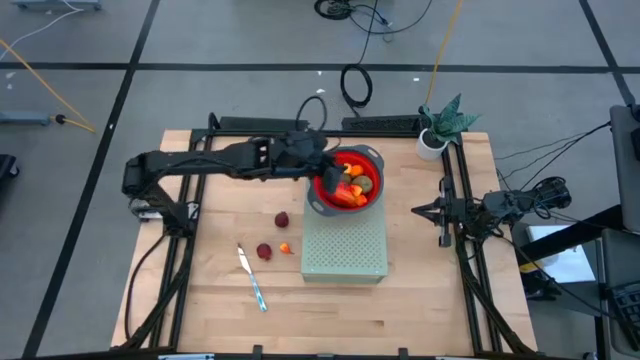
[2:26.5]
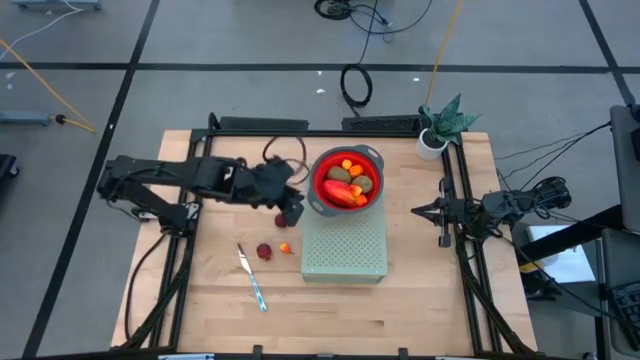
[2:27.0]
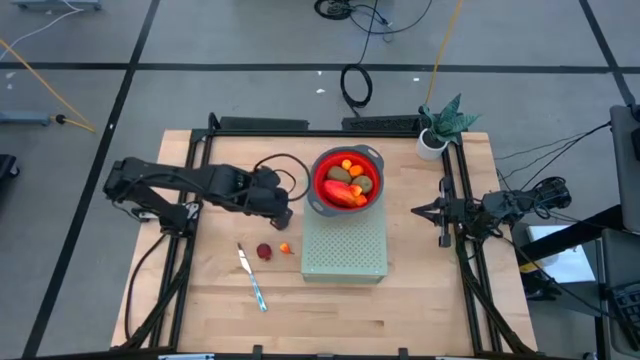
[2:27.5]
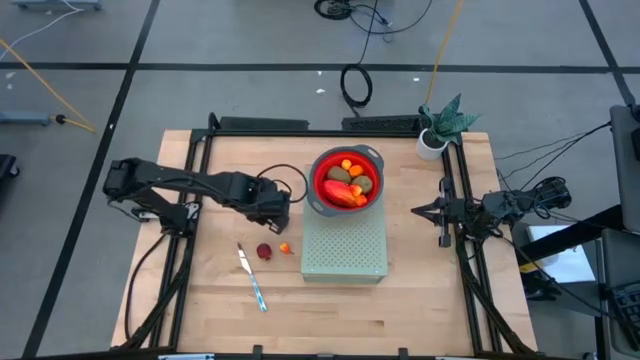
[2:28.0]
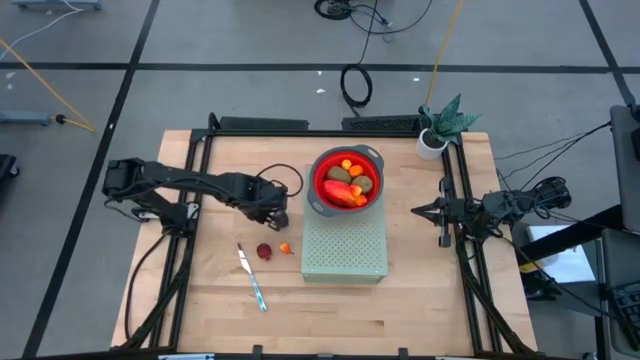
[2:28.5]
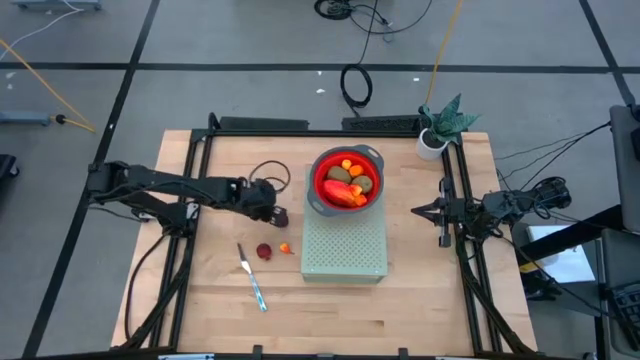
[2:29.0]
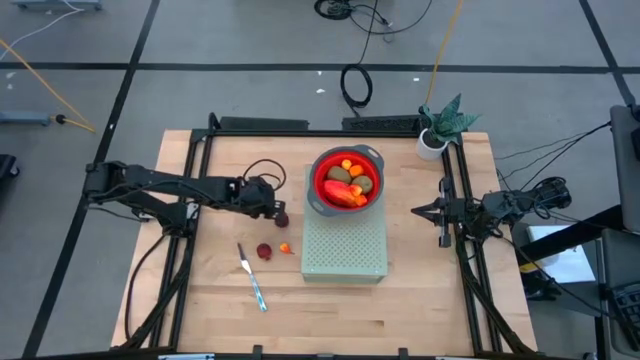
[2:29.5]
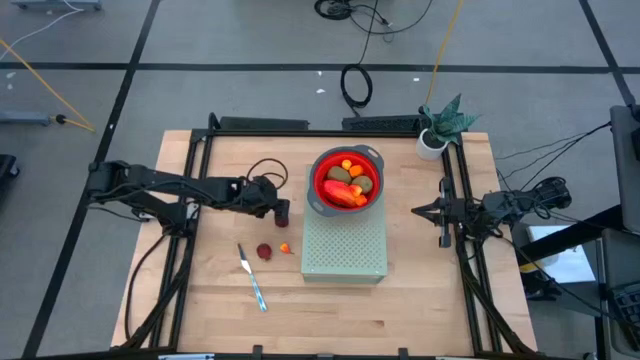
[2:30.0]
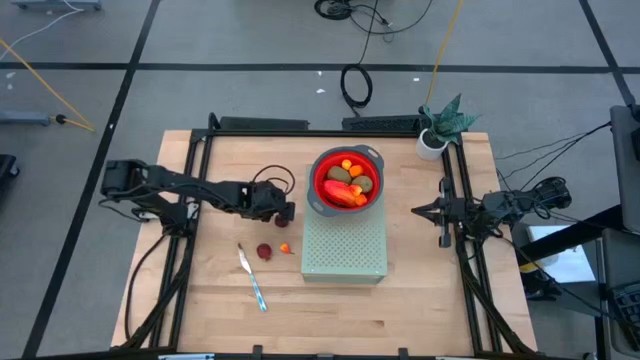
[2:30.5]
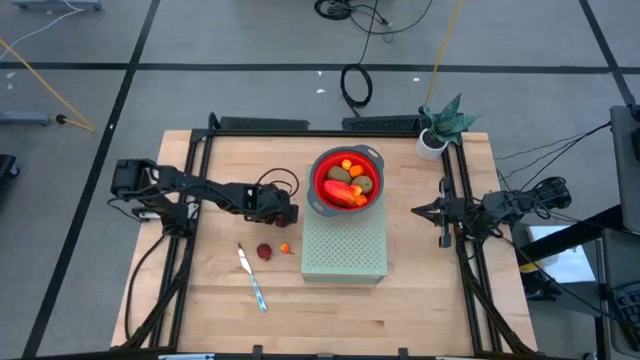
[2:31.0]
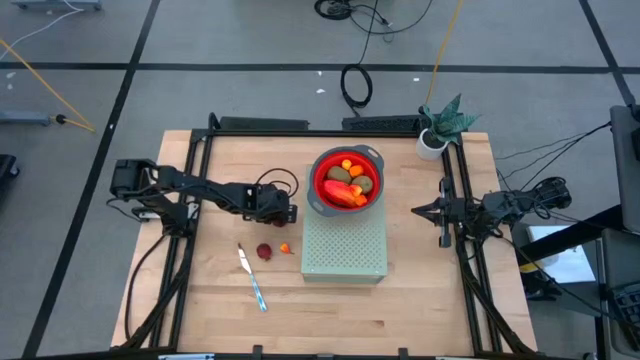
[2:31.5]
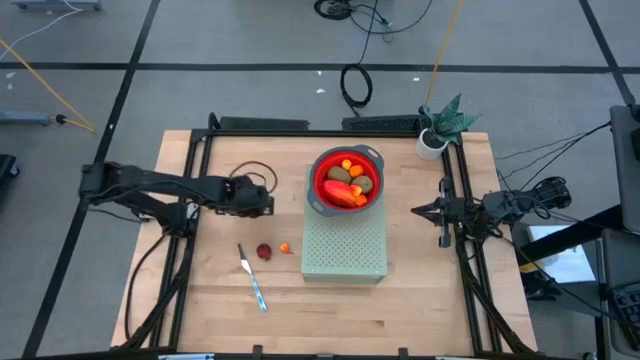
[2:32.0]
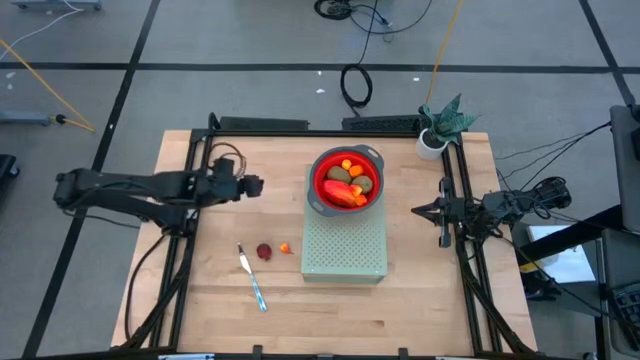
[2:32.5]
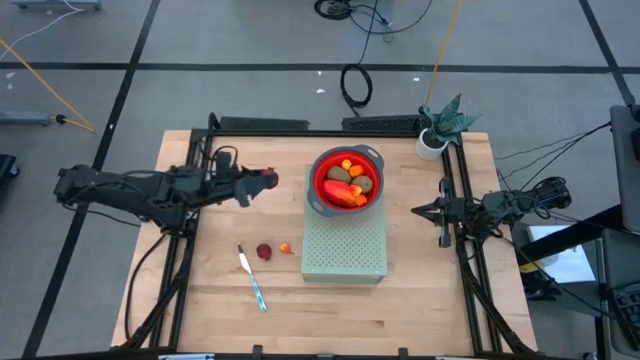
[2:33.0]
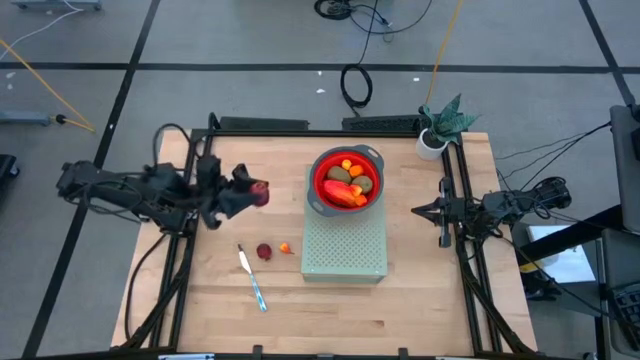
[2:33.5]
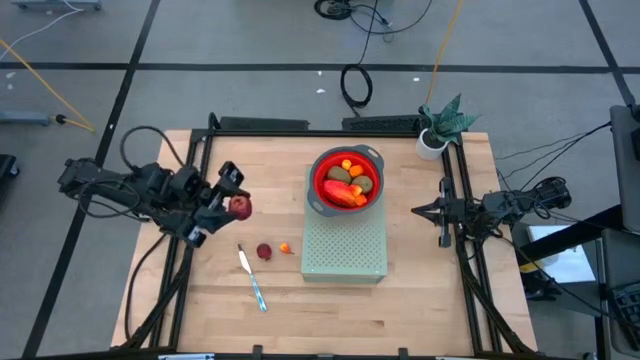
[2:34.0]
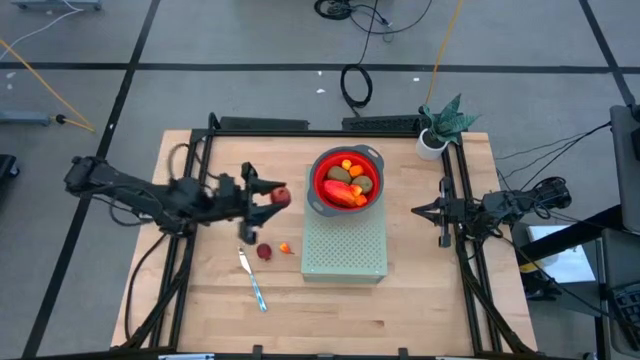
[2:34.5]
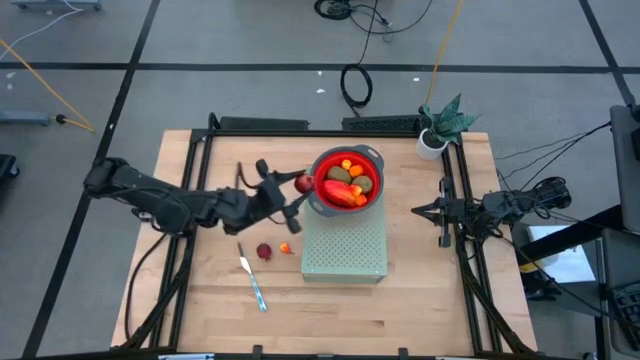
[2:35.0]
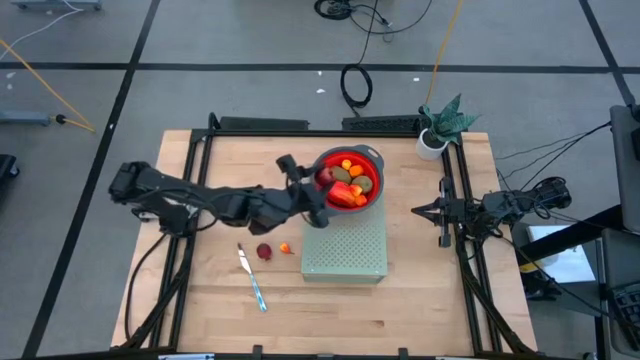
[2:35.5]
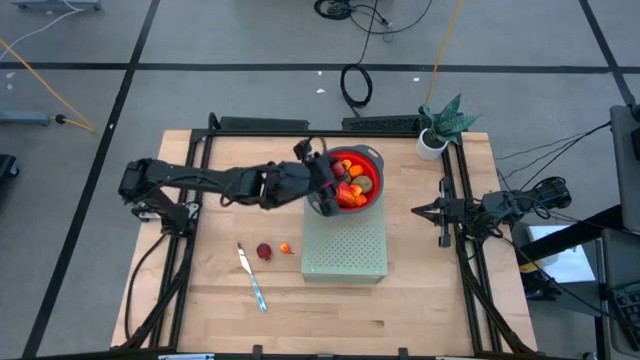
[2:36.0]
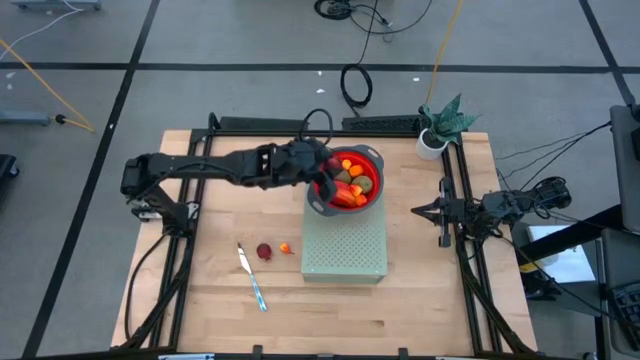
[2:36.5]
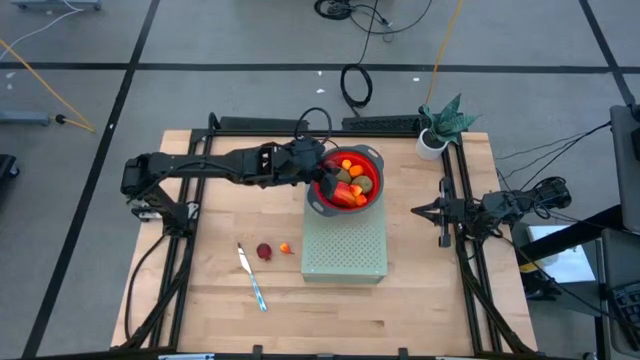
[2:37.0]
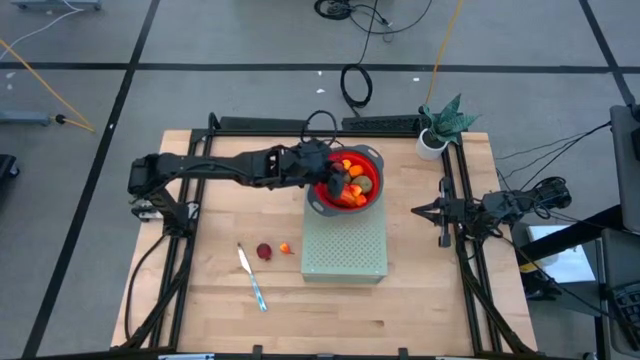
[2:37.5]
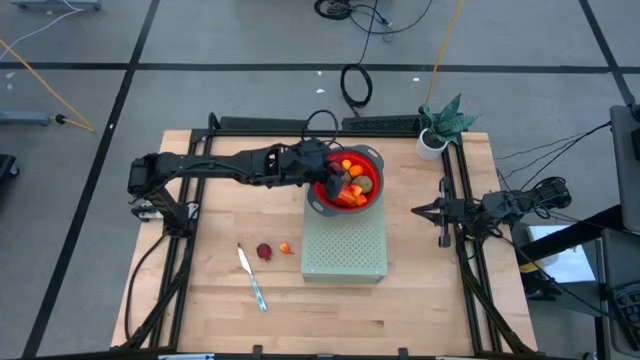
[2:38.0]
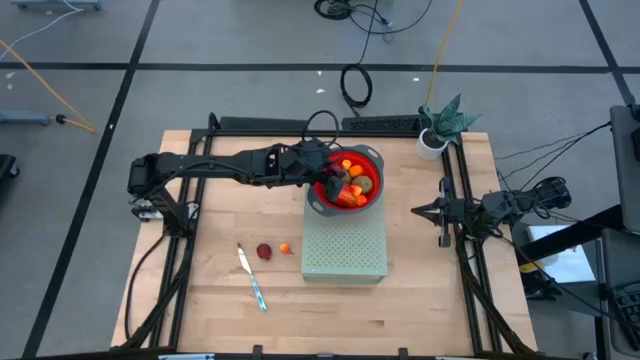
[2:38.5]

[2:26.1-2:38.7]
Task: Pick & Place Fruit
Put the pomegranate into the red strainer bowl on the shelf

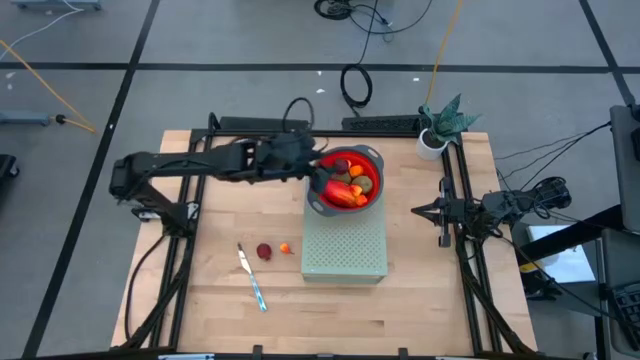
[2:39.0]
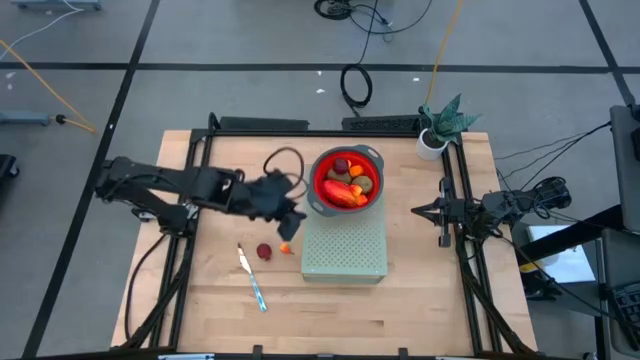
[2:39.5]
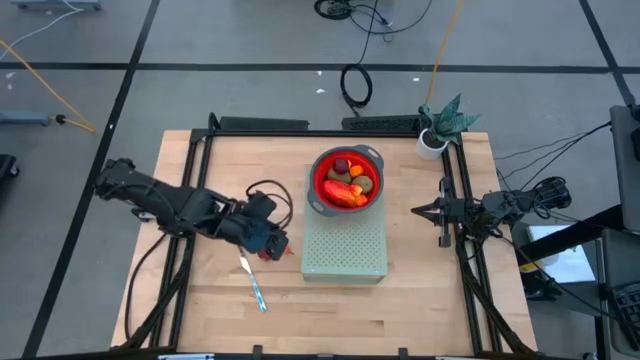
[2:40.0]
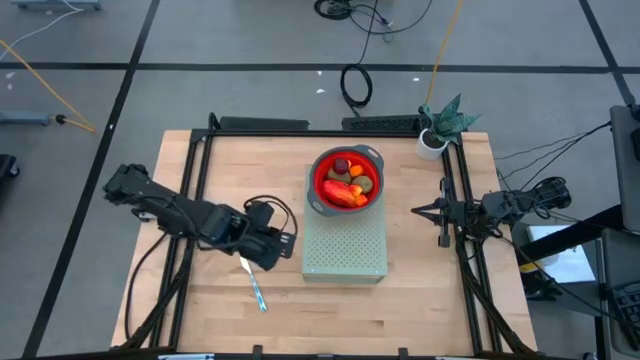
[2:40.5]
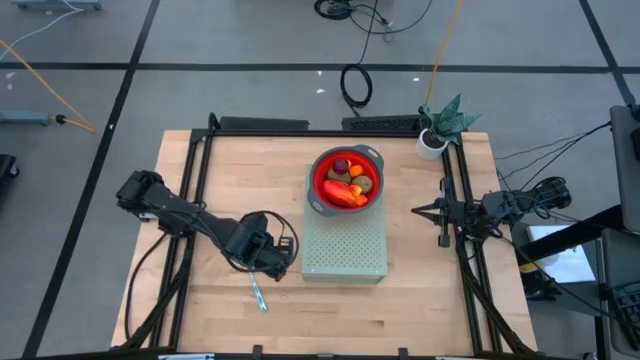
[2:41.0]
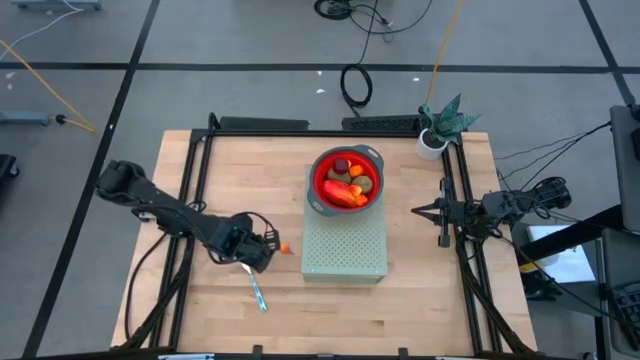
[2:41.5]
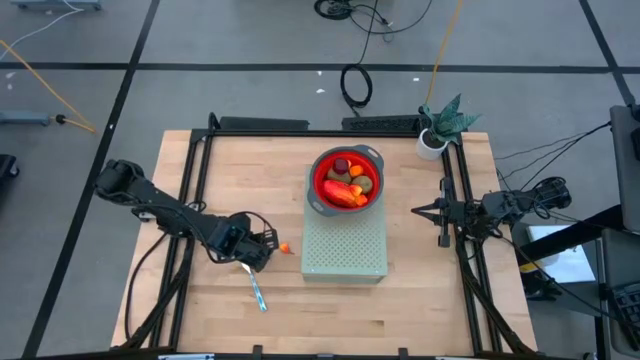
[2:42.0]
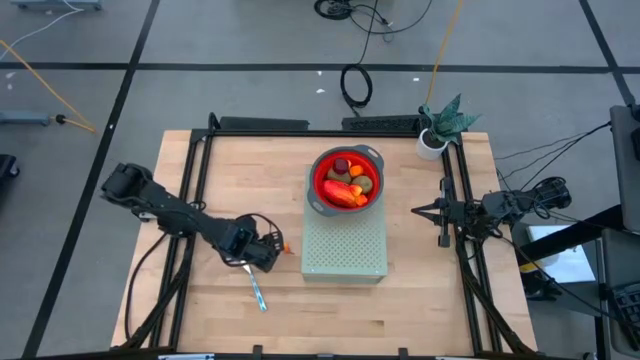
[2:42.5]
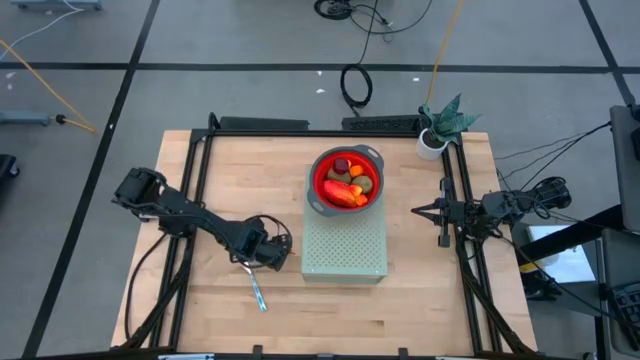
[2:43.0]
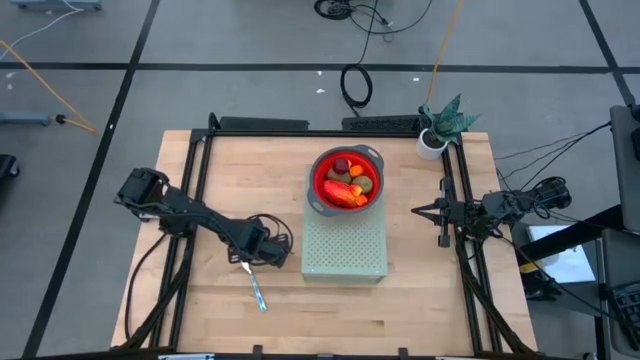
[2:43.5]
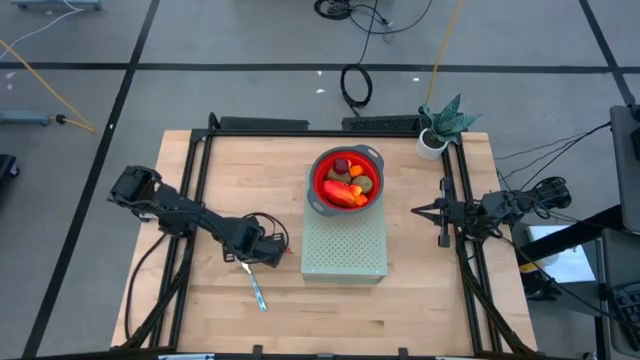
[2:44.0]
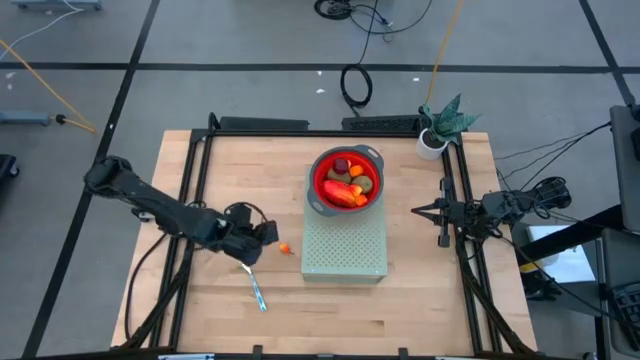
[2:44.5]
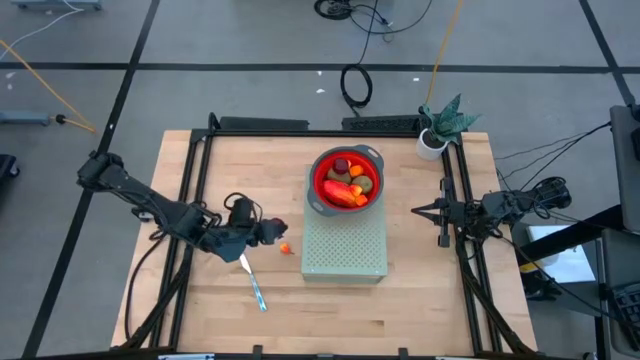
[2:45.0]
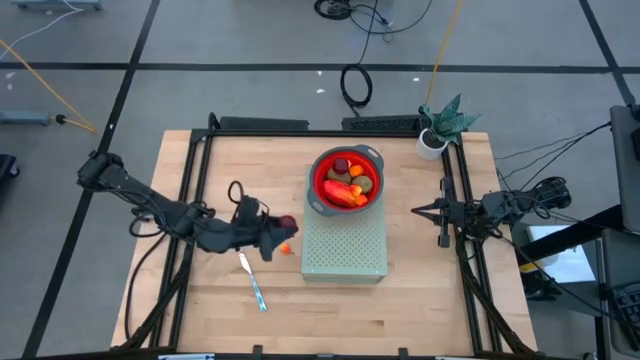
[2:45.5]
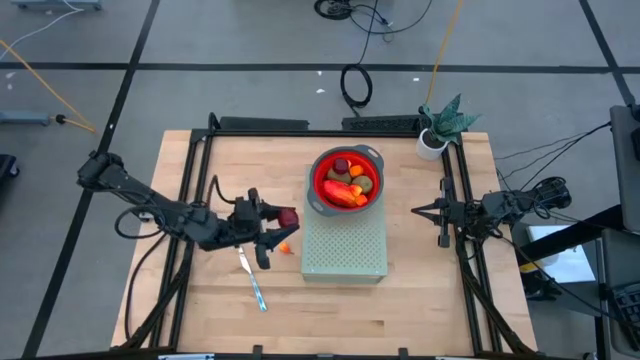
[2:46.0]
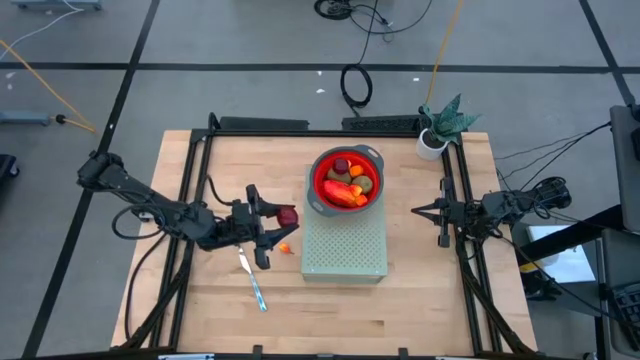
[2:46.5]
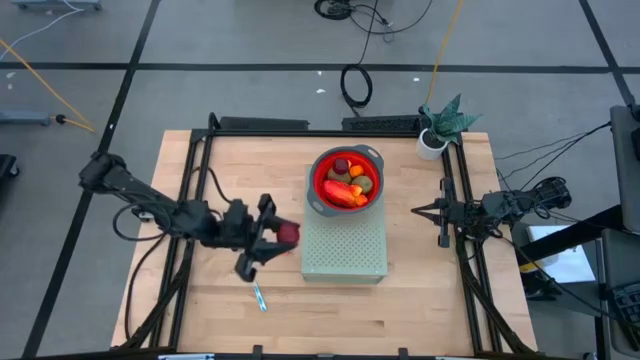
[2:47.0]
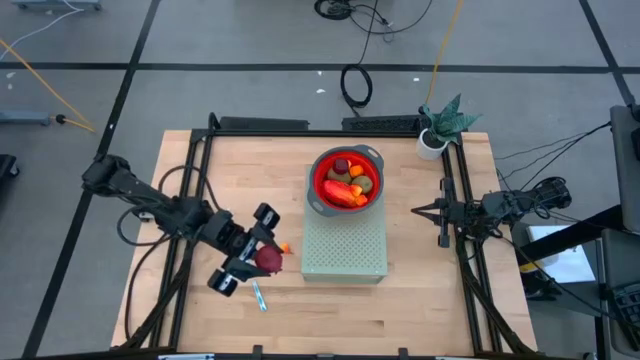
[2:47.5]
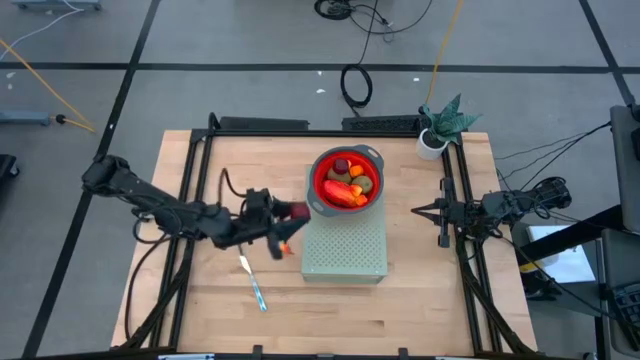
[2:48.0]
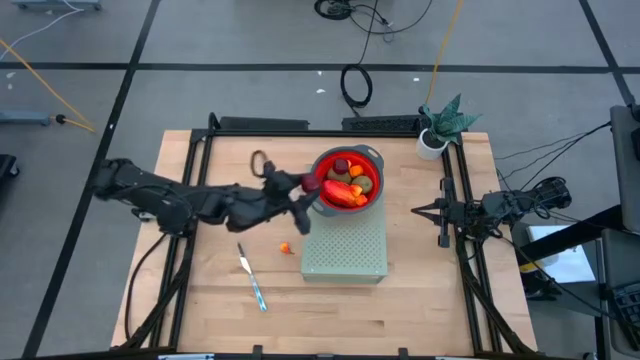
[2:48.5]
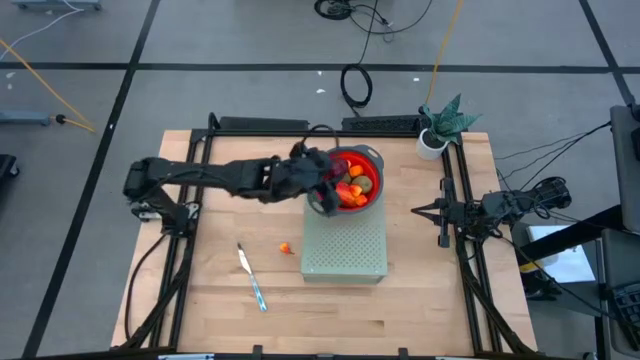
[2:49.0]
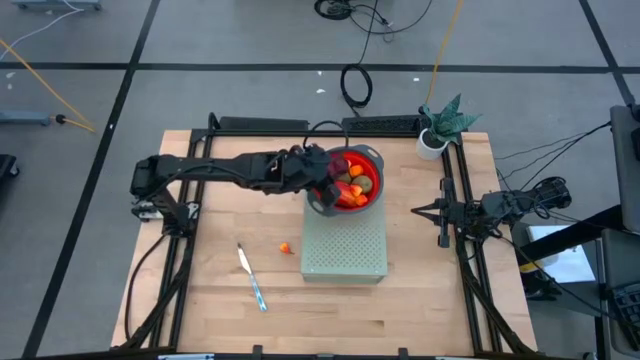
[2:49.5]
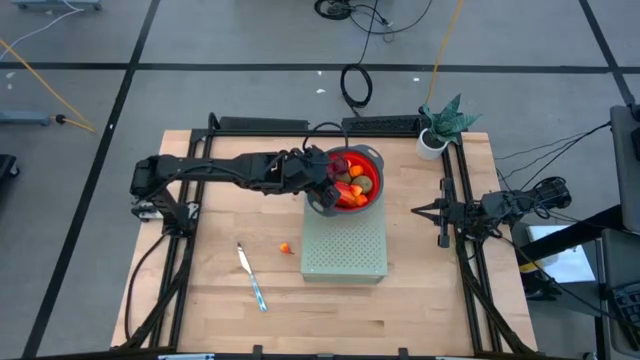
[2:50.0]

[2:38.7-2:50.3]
Put the pomegranate into the red strainer bowl on the shelf
